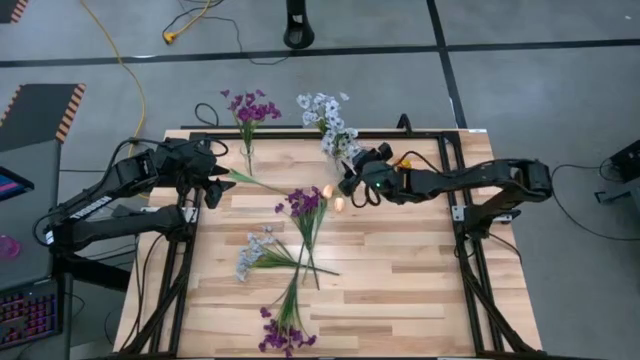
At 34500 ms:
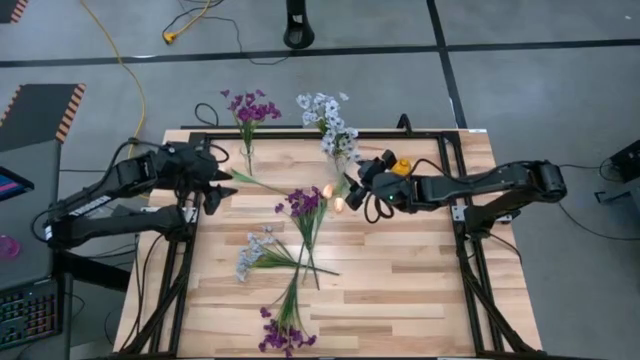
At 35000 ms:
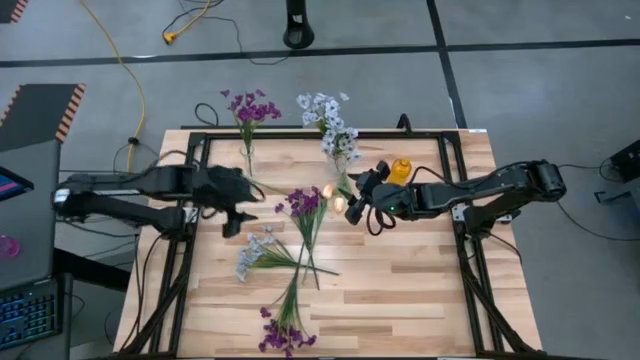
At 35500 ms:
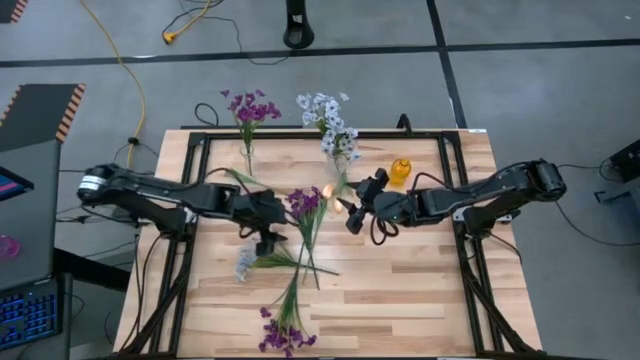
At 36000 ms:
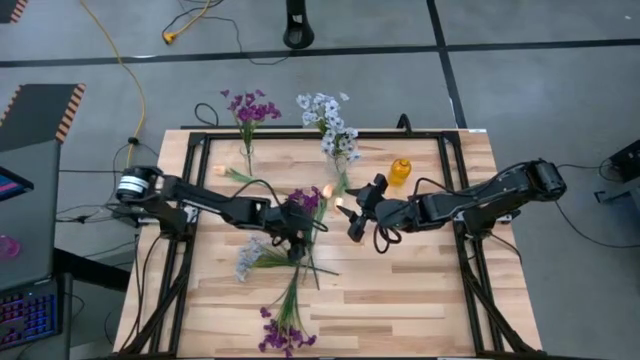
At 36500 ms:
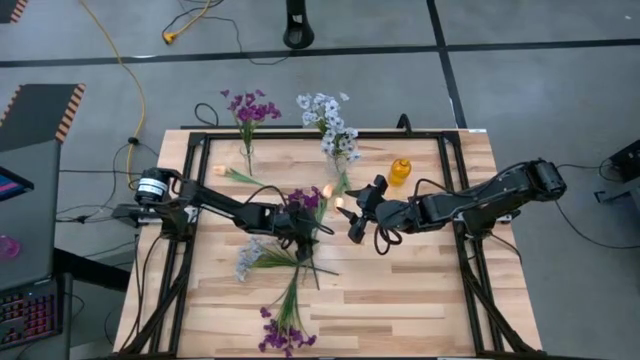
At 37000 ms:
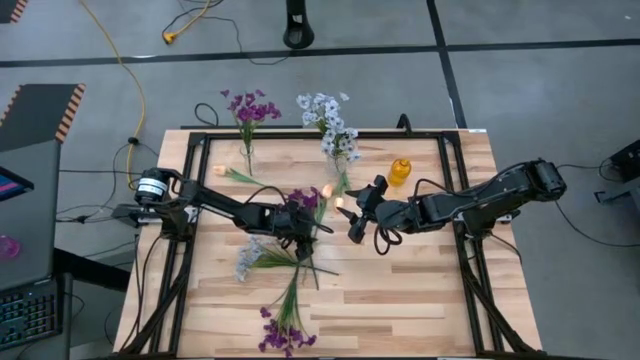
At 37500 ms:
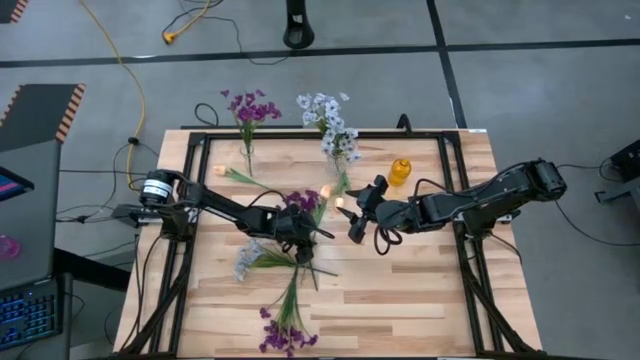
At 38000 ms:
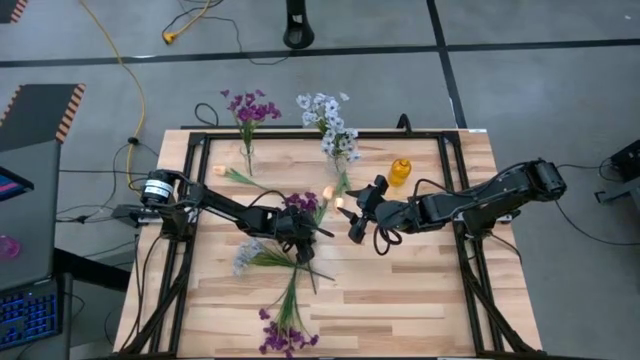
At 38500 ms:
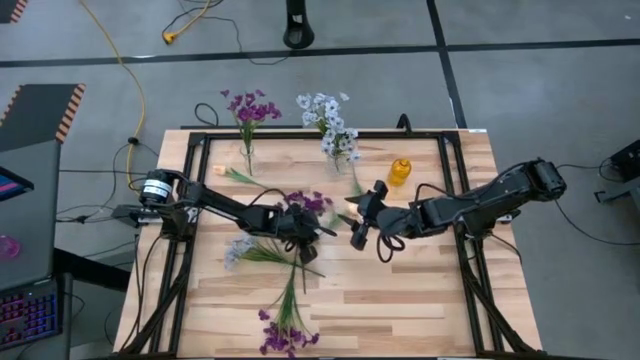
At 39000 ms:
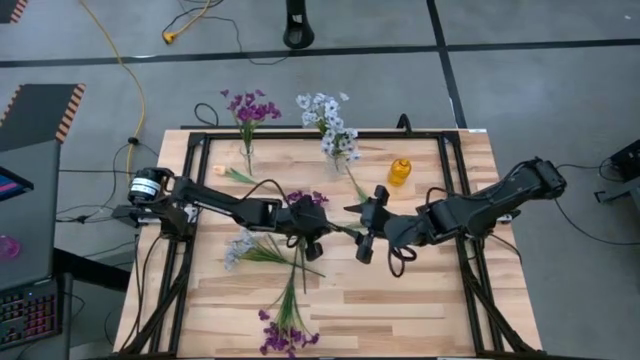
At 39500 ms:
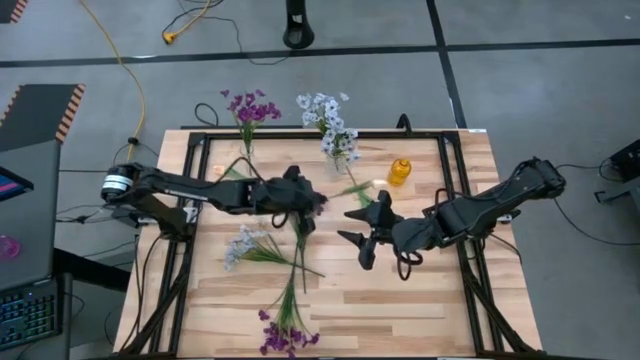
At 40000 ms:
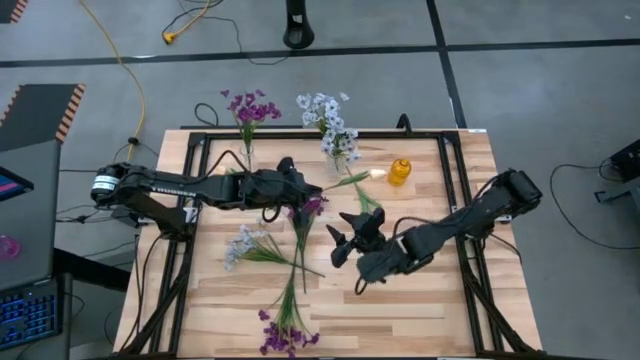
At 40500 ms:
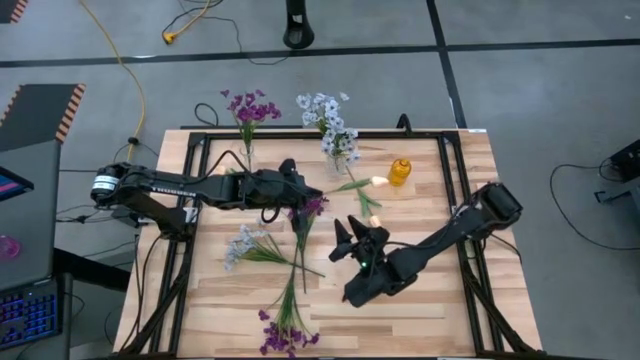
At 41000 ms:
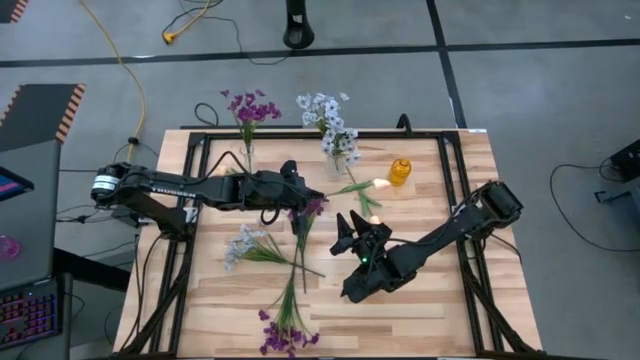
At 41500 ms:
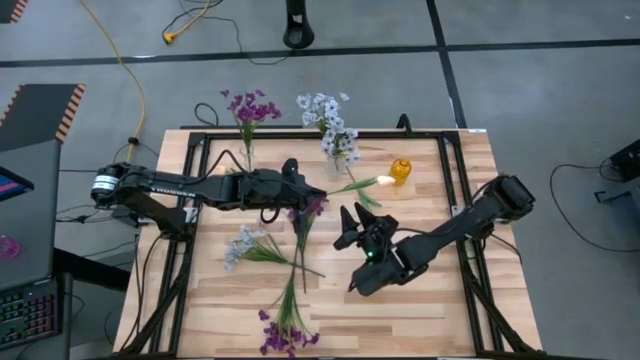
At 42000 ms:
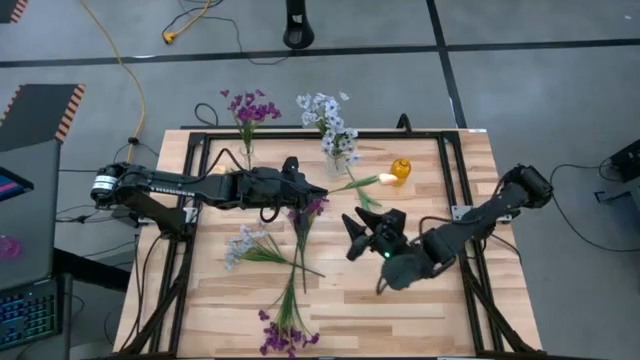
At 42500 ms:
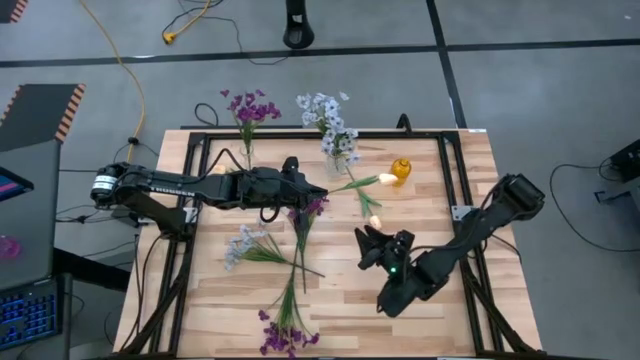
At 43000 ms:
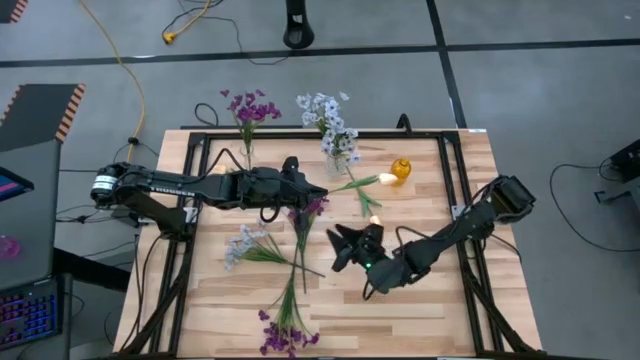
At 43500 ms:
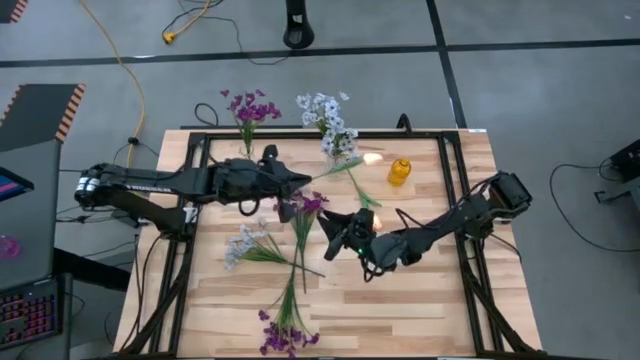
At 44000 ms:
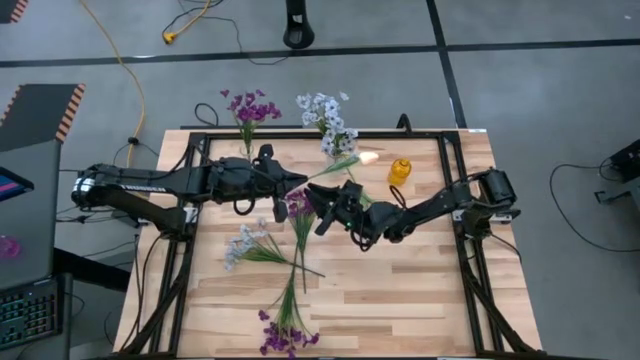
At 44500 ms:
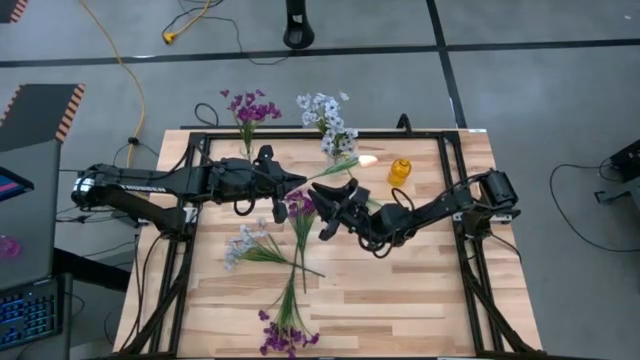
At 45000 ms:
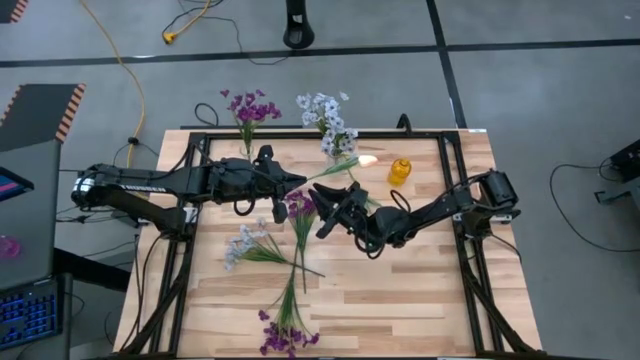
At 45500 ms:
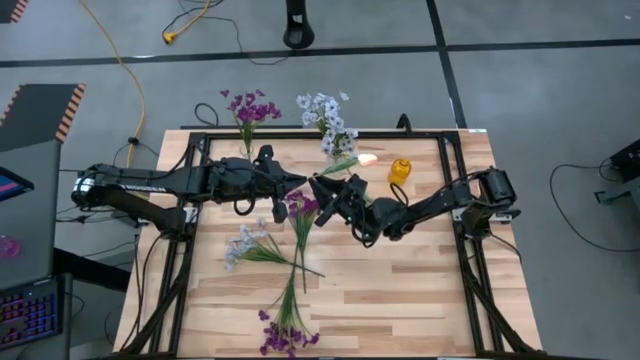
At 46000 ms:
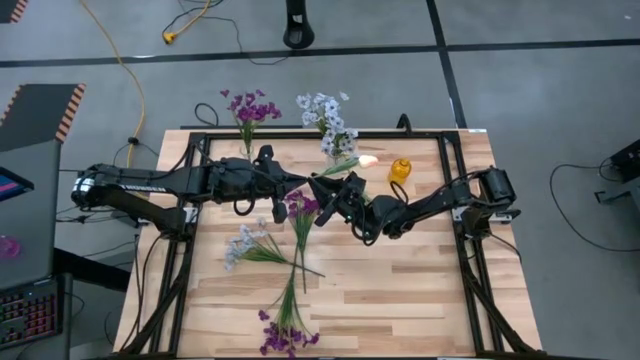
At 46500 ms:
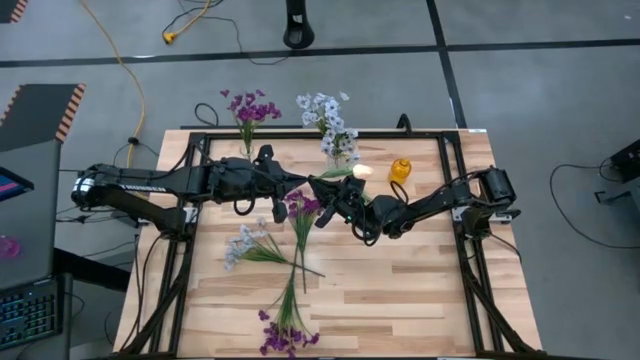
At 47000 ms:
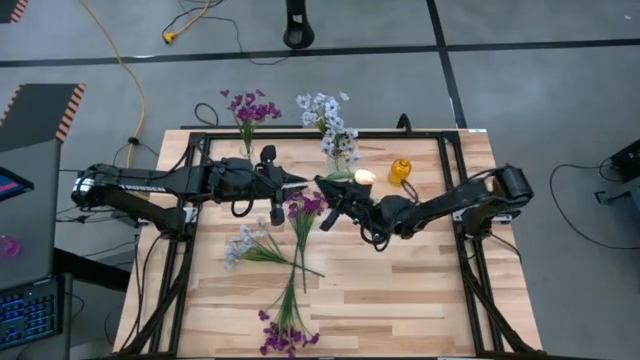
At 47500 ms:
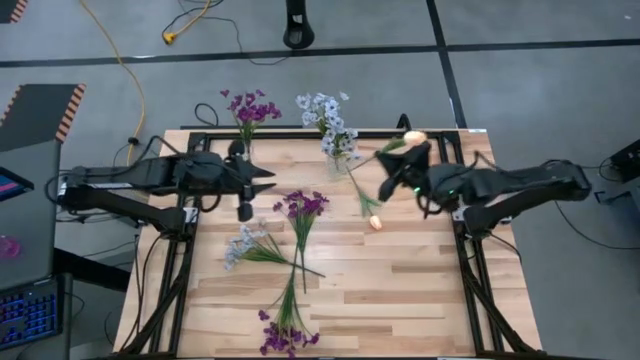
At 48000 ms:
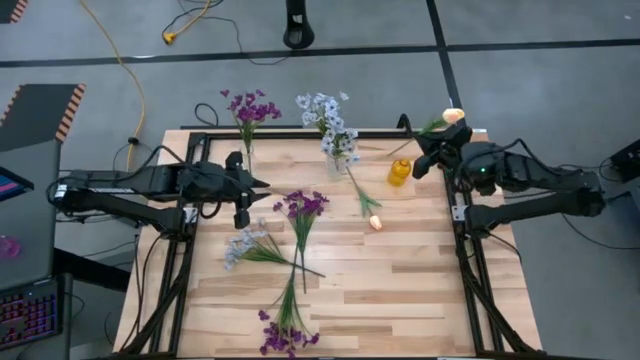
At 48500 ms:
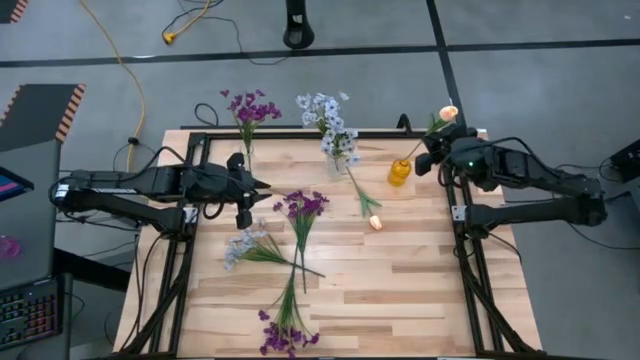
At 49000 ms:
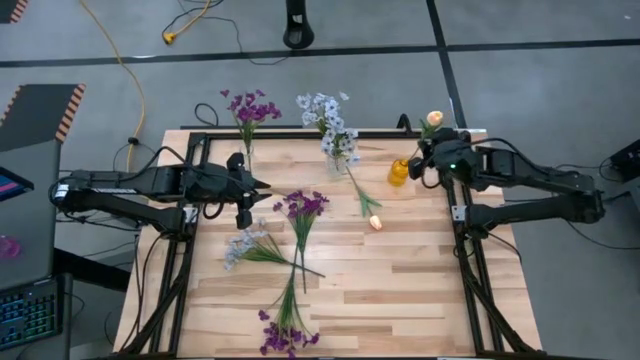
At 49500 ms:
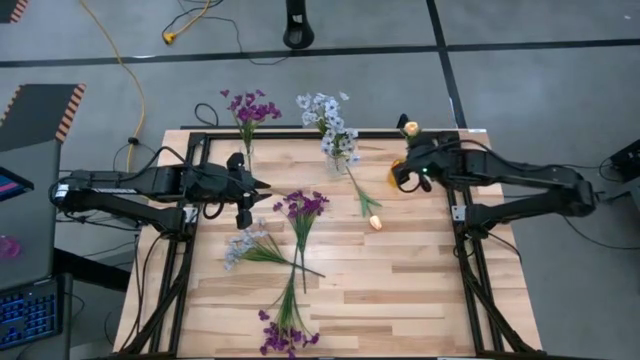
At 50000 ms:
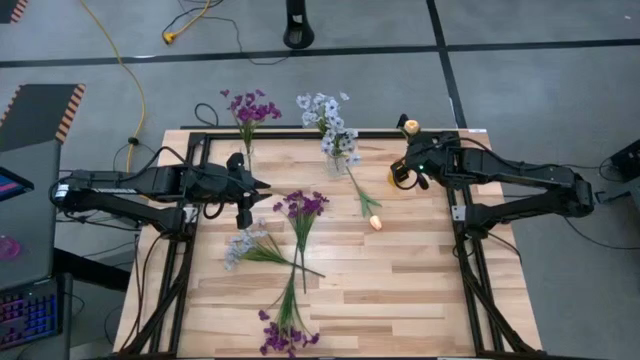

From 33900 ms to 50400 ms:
Task: Sort flowers into vase by color
Put the bottom yellow tulip into the yellow vase
